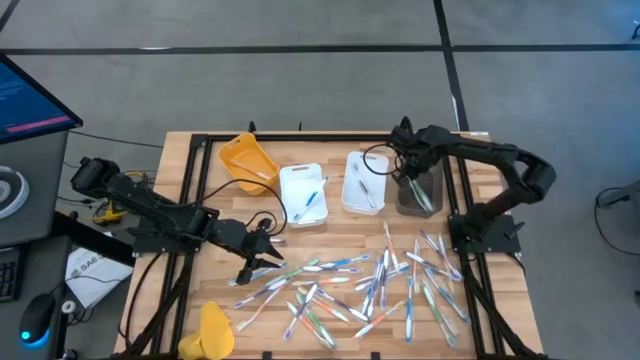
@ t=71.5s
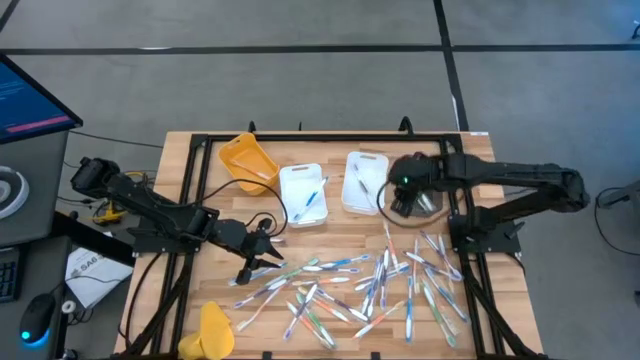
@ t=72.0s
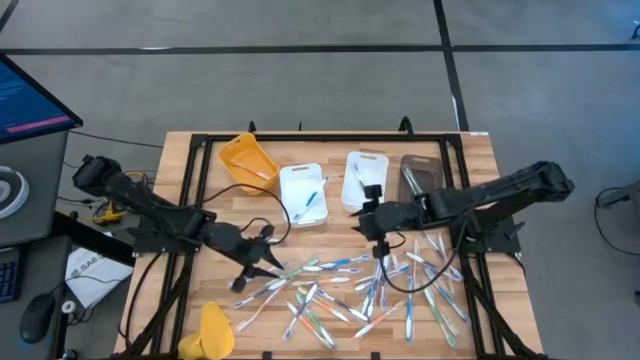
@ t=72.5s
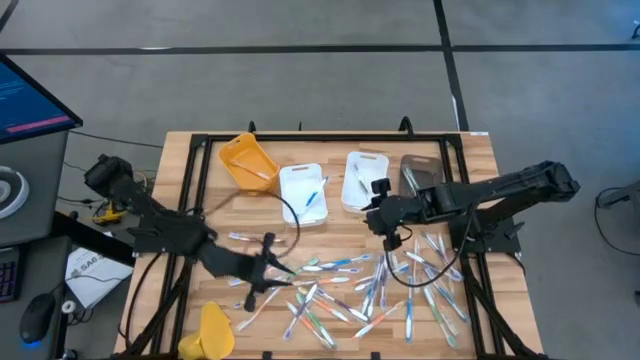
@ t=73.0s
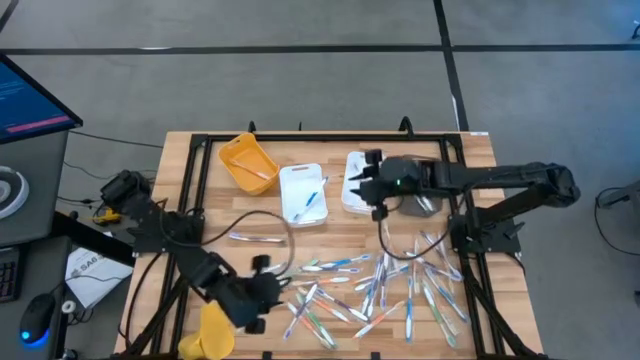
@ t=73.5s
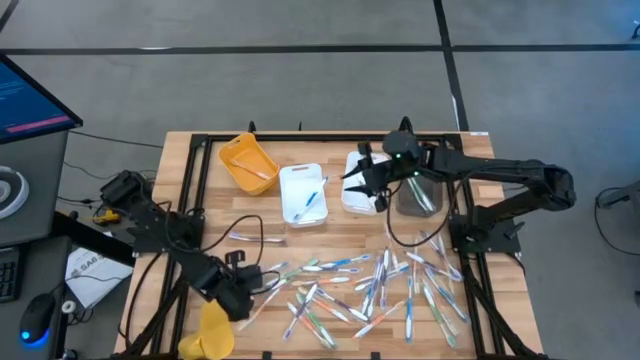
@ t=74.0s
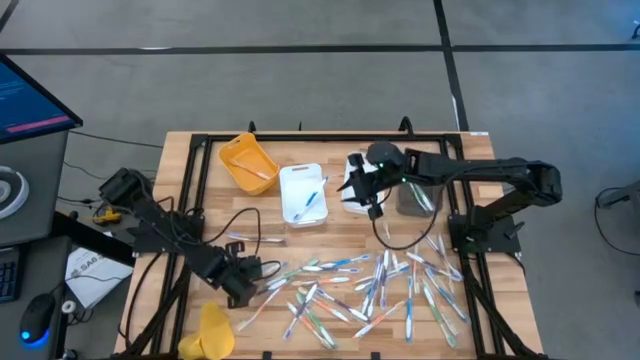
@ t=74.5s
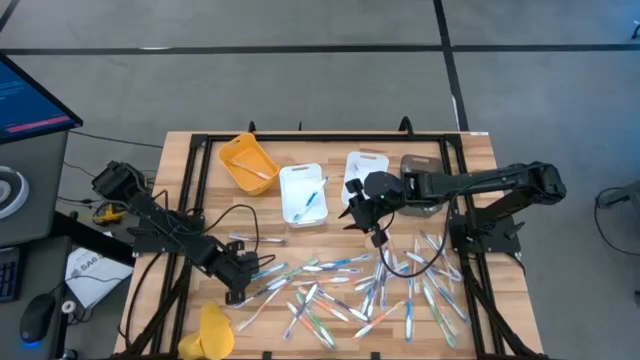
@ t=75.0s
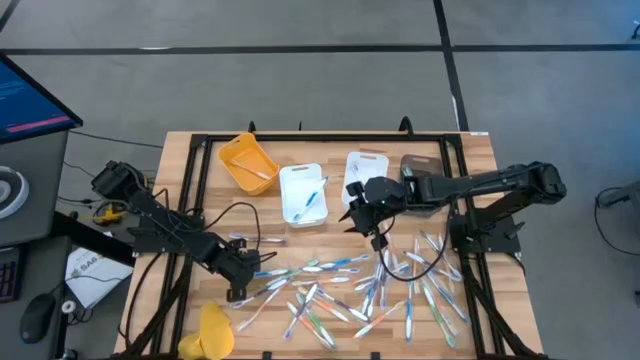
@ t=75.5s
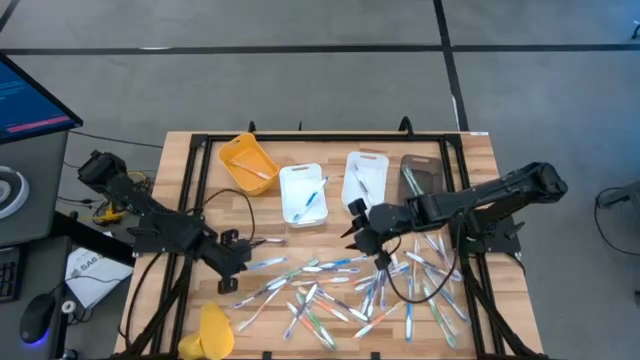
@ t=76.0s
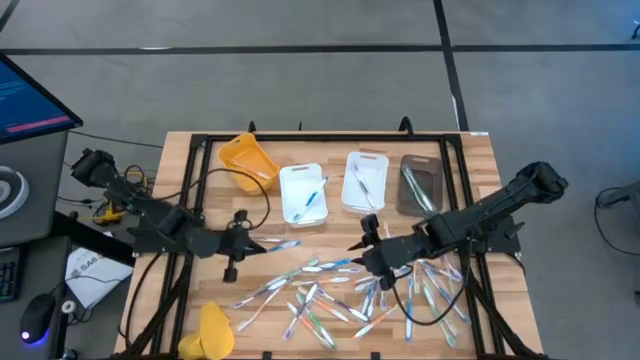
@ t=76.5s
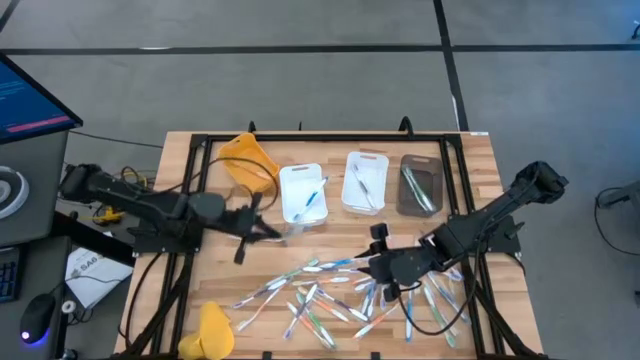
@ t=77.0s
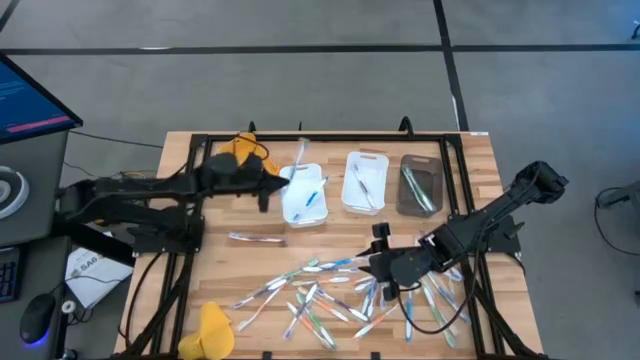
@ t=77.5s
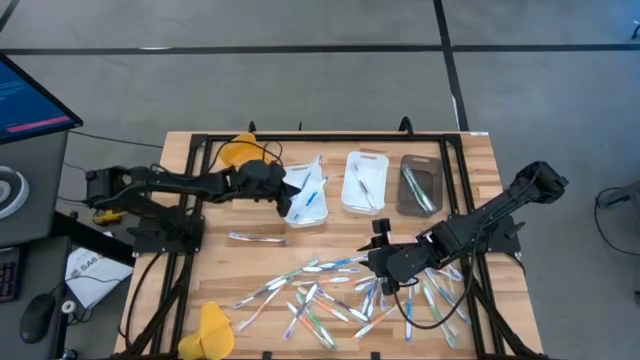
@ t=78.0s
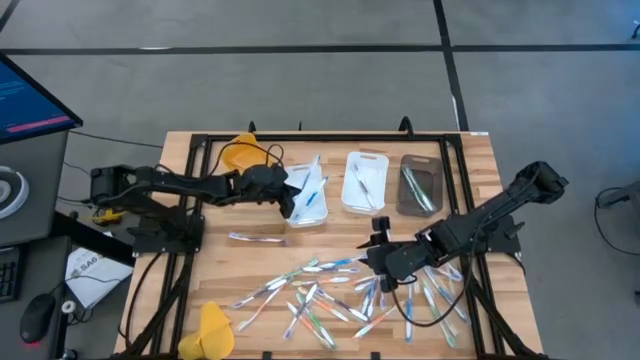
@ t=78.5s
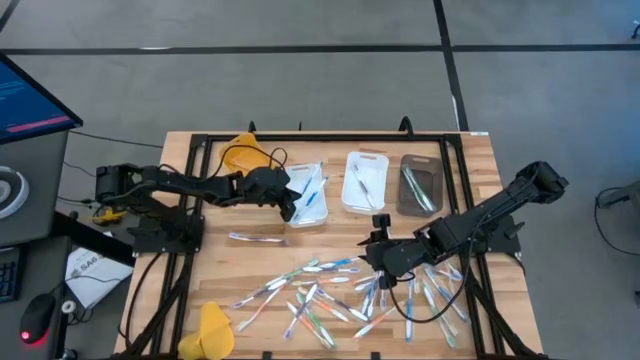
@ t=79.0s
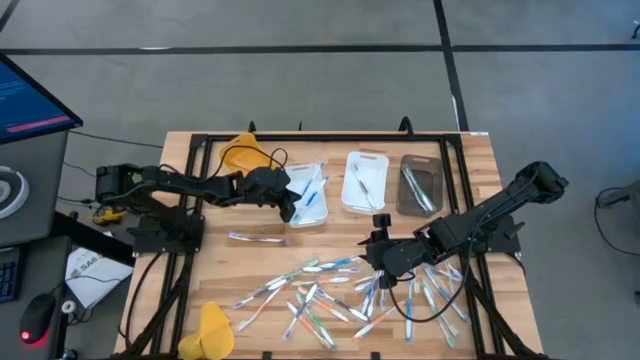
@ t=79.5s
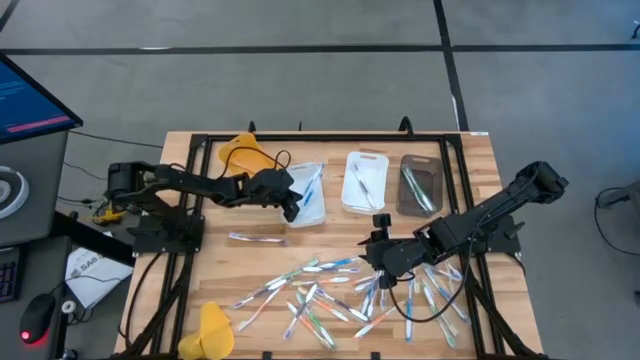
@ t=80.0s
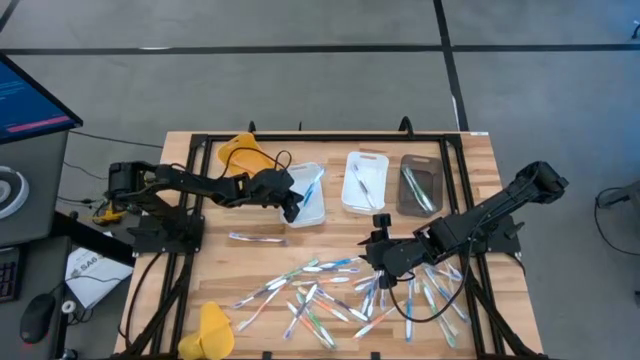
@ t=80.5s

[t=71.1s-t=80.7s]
Task: Pick & Place Toothbrushes
Put the blue toothbrush into the left white bin

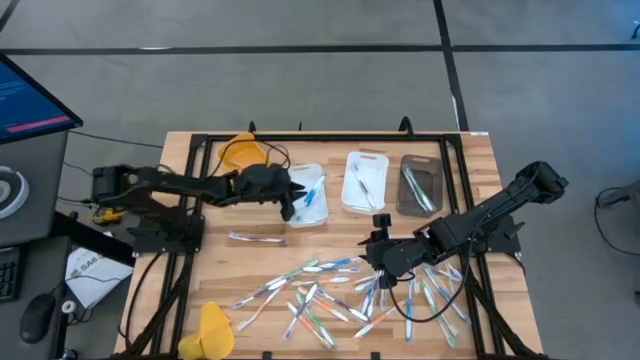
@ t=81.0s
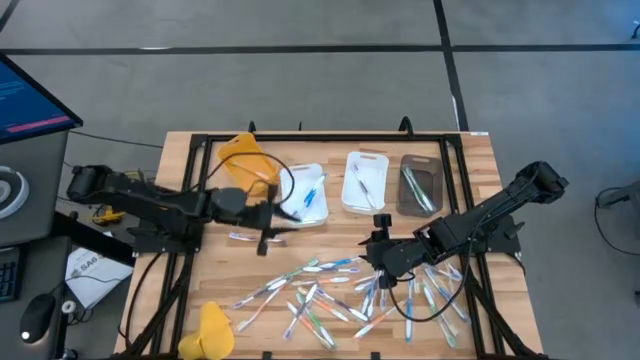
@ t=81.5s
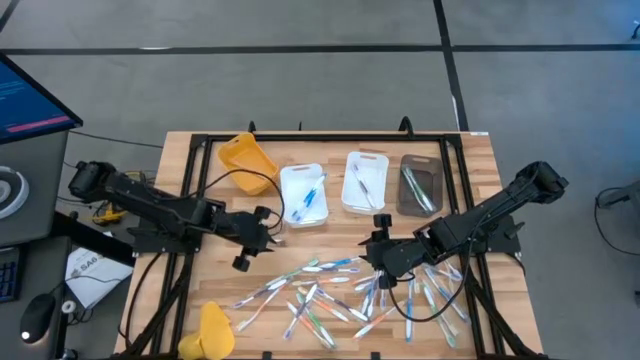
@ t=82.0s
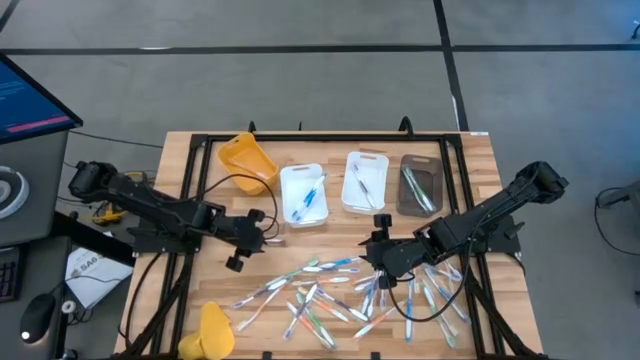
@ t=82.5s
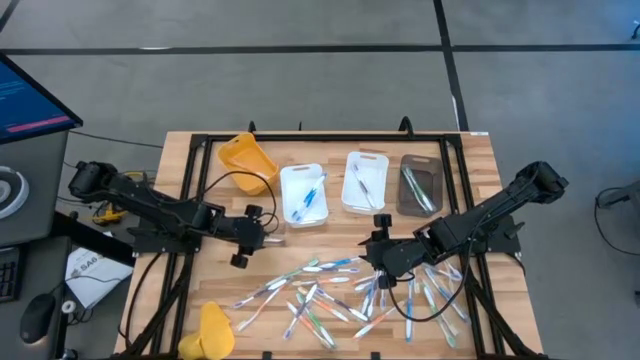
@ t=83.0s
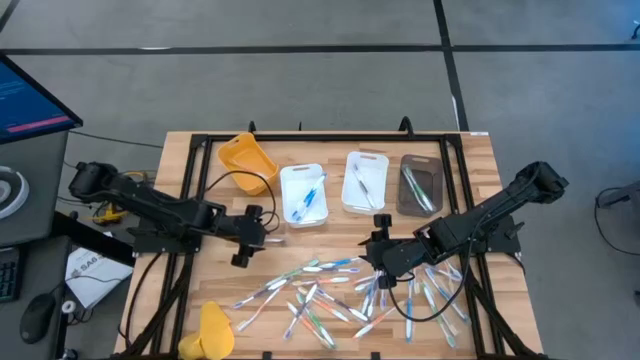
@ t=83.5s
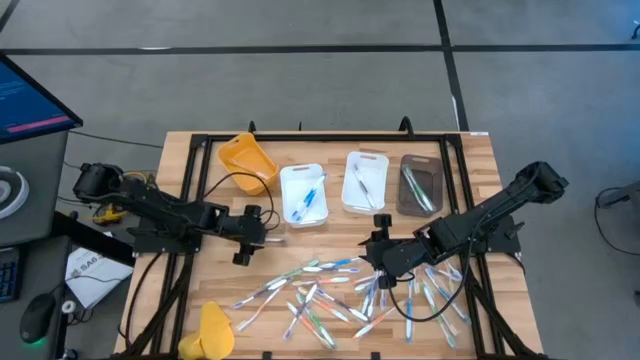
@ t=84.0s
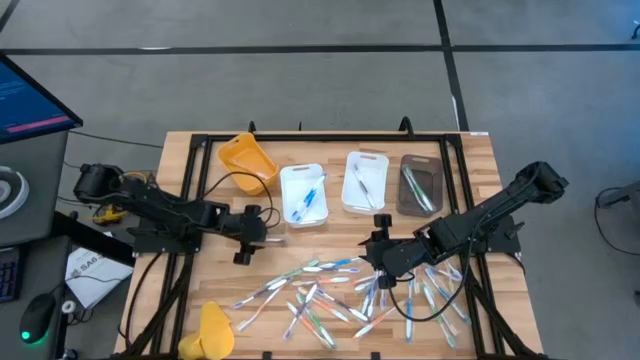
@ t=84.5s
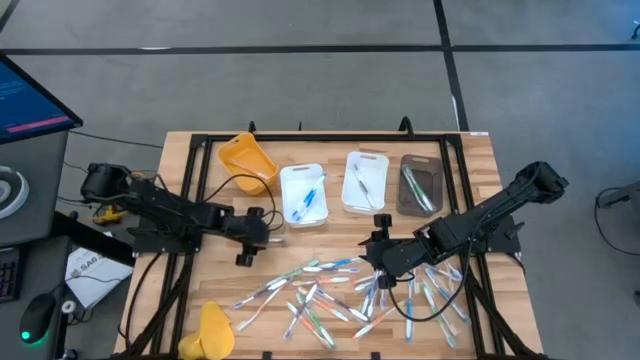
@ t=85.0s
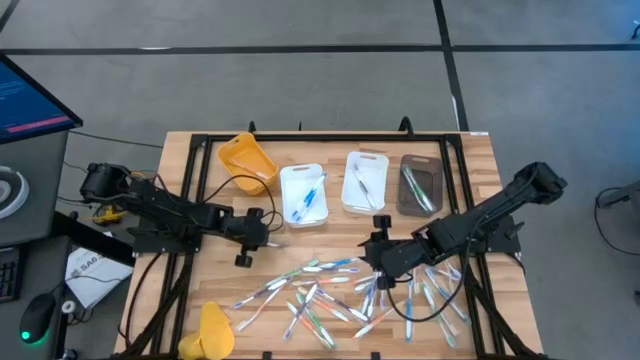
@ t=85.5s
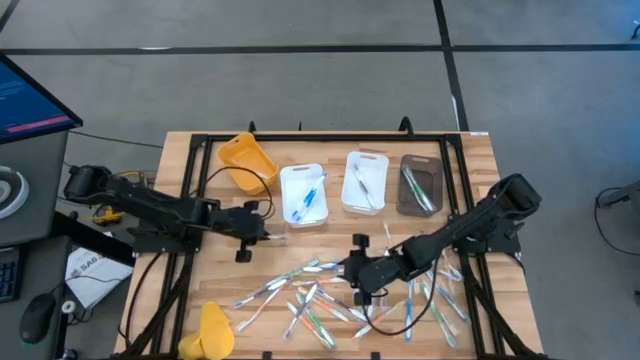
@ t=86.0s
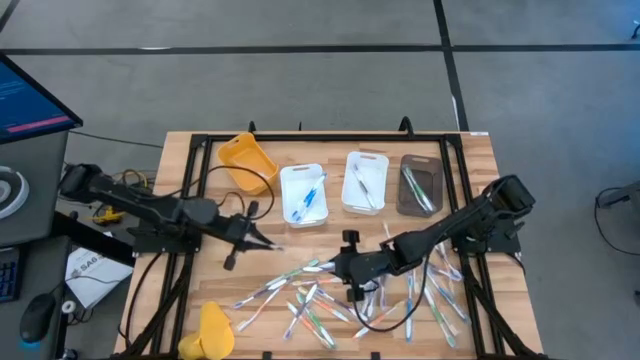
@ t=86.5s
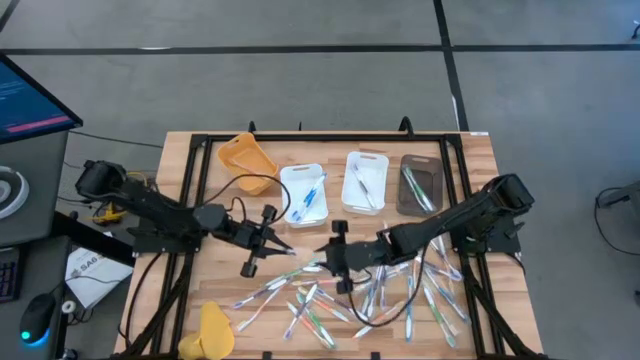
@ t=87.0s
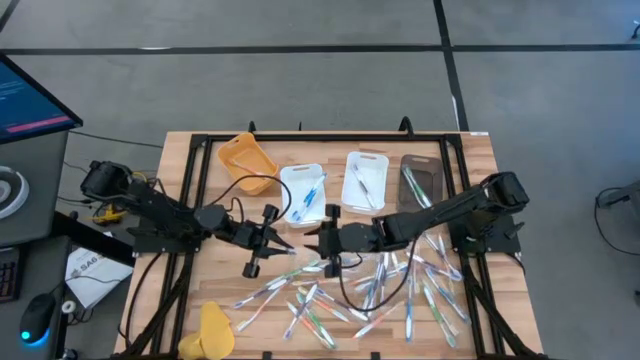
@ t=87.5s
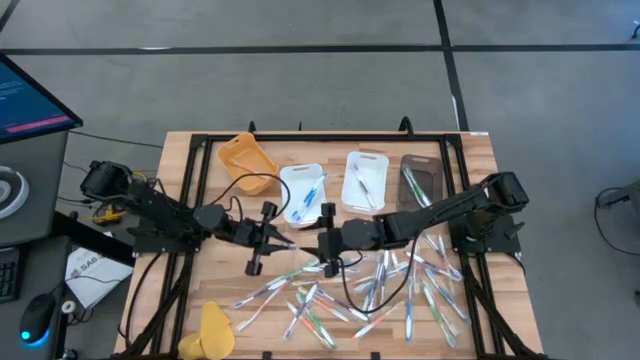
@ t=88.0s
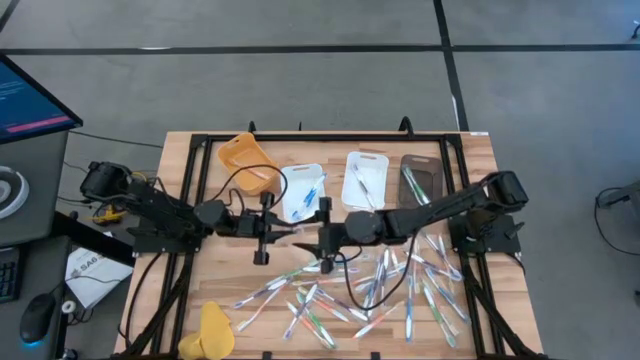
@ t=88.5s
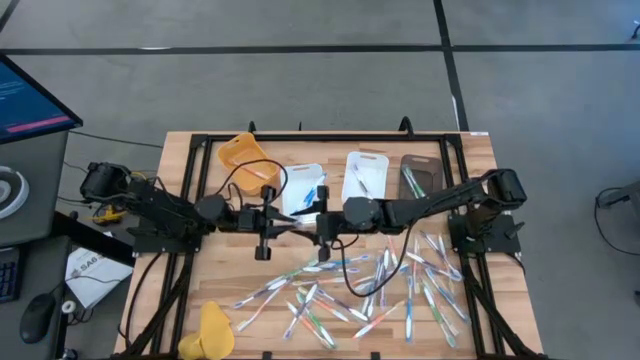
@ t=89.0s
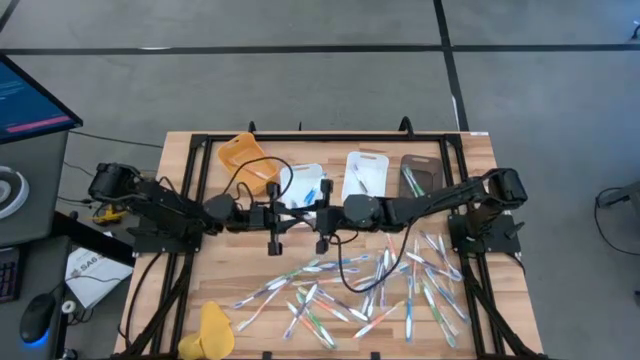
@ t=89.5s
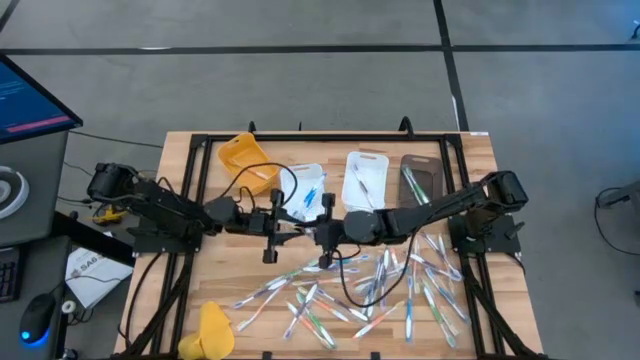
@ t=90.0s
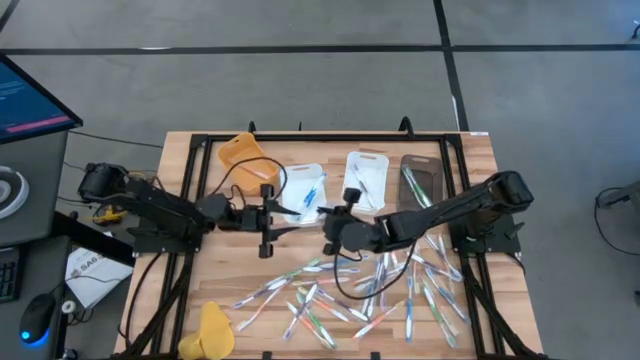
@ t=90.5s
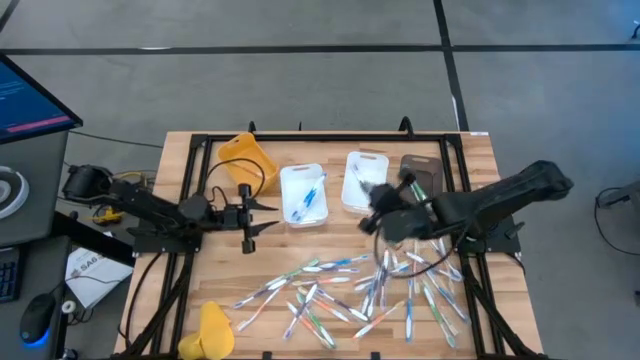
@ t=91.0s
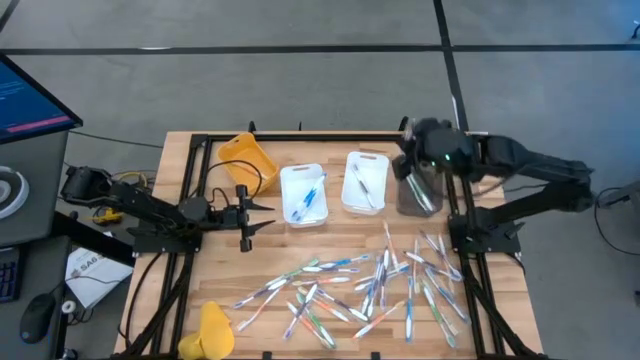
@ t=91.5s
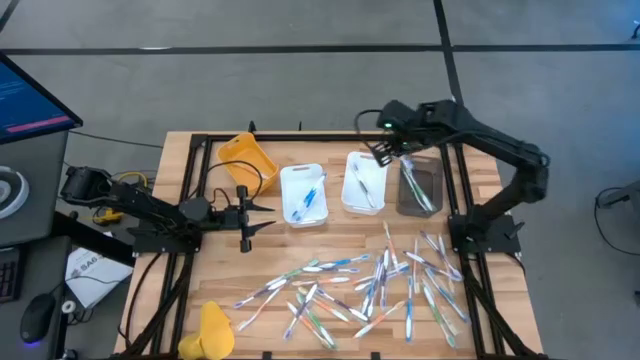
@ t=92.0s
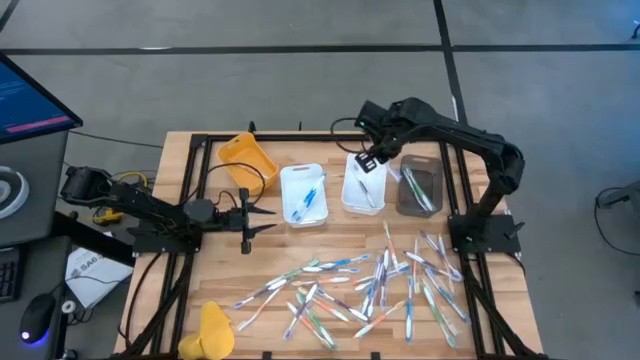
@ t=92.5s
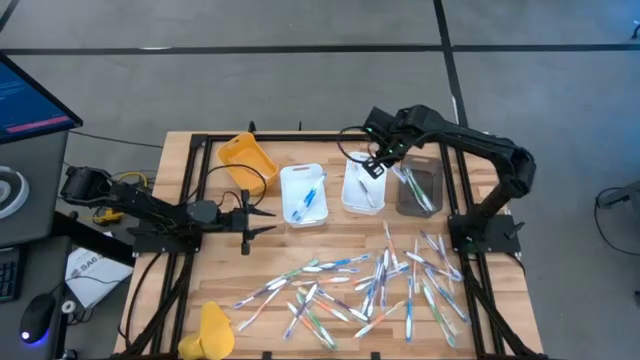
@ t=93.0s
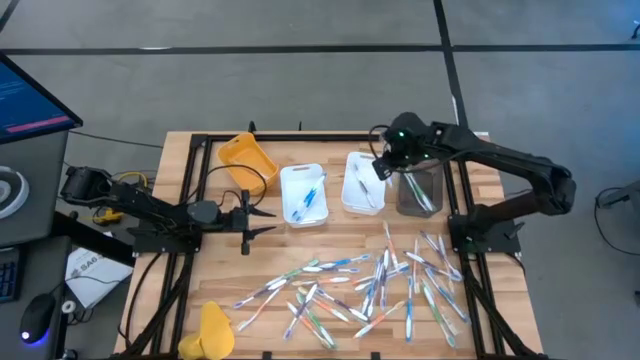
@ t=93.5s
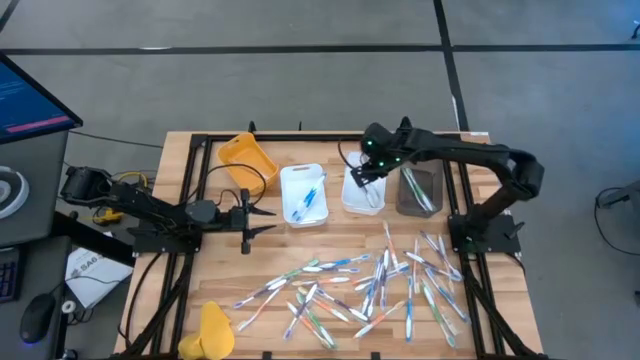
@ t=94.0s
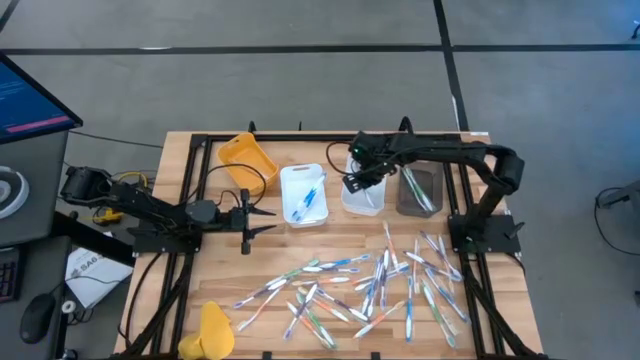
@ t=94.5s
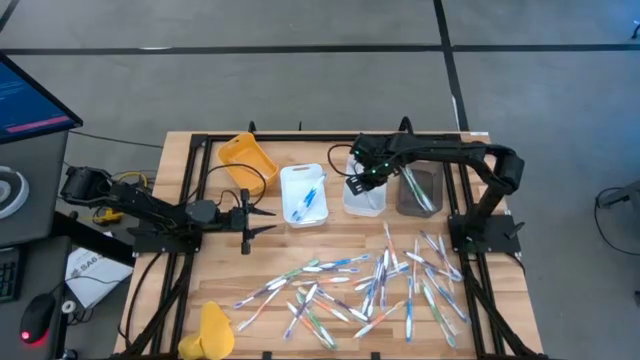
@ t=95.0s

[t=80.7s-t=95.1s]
Put the purple toothbrush into the right white bin
